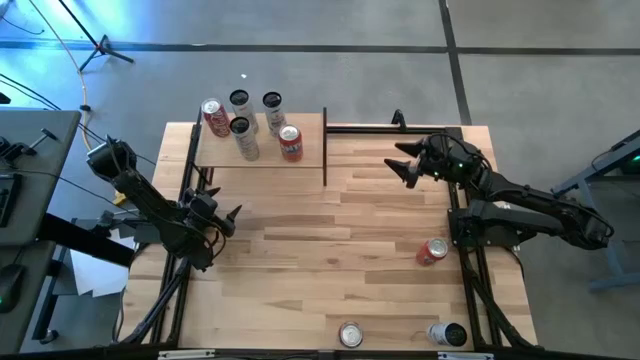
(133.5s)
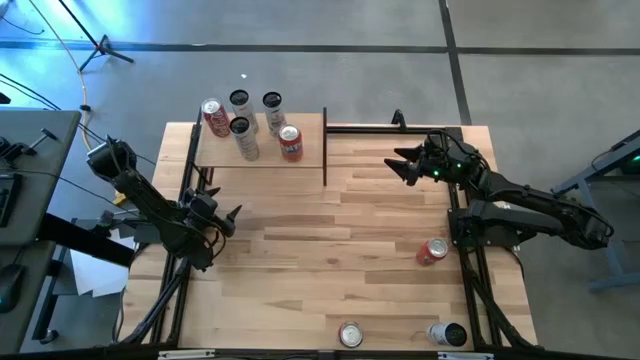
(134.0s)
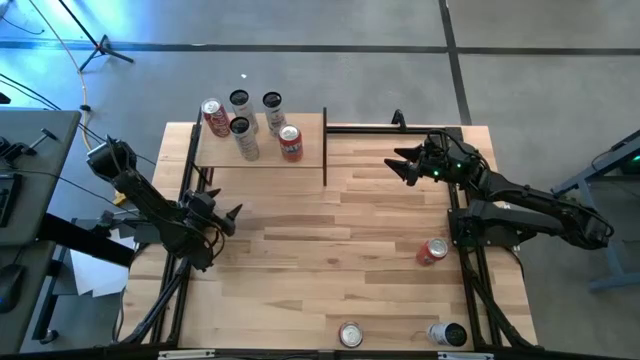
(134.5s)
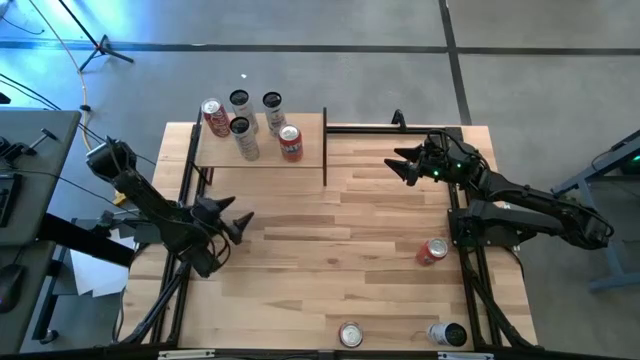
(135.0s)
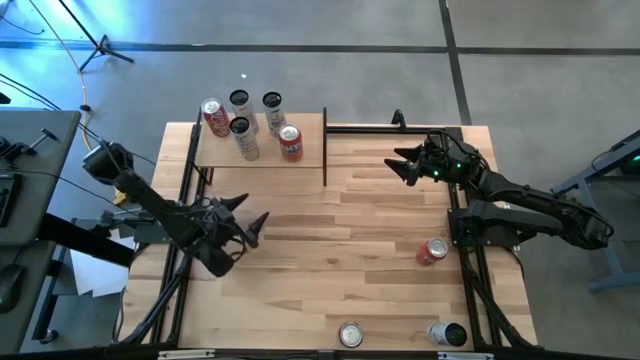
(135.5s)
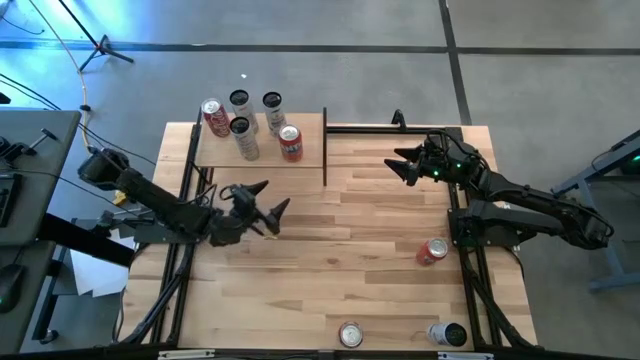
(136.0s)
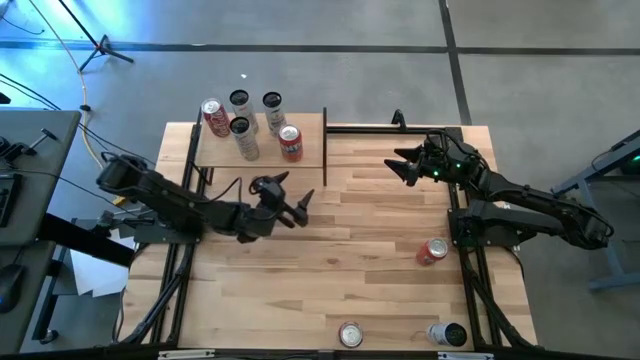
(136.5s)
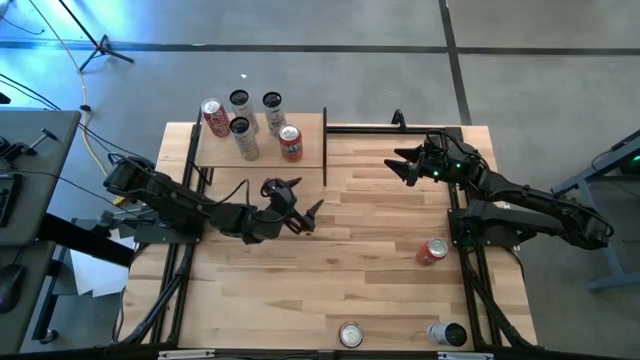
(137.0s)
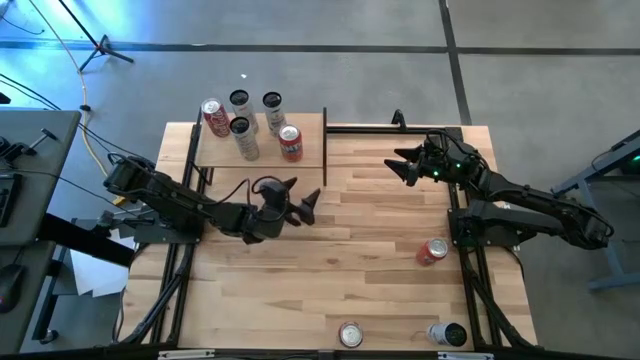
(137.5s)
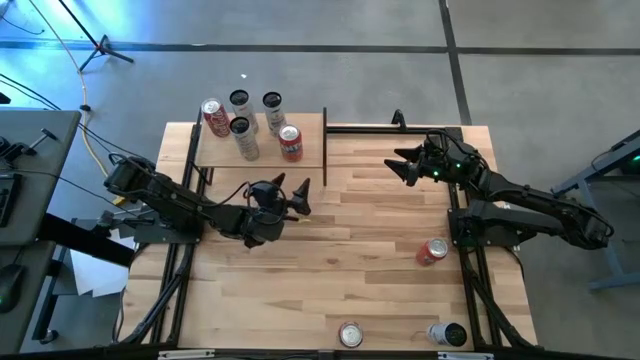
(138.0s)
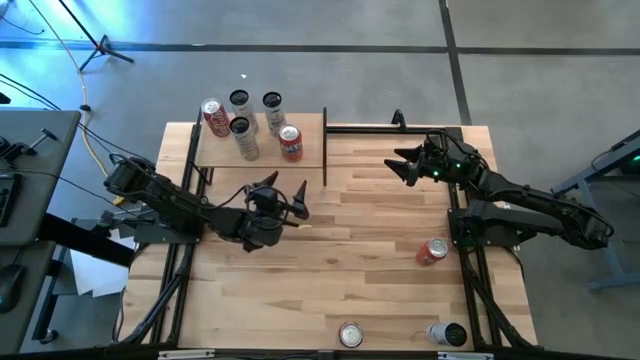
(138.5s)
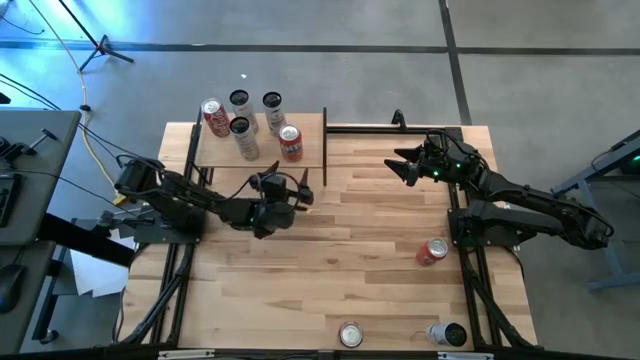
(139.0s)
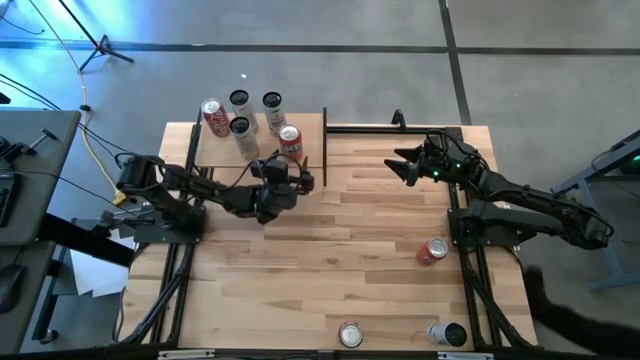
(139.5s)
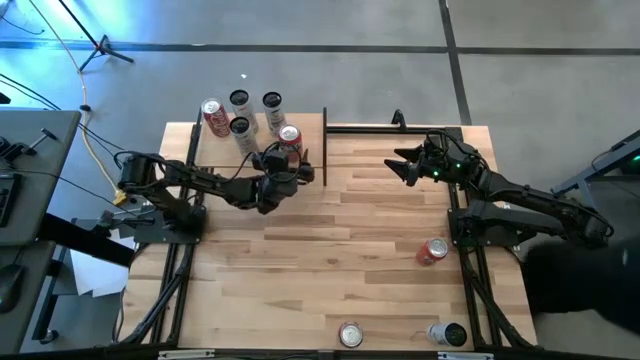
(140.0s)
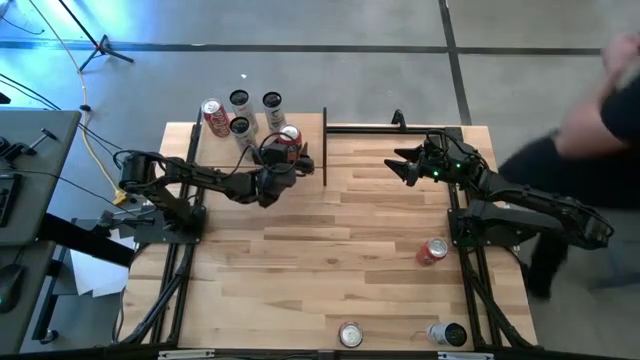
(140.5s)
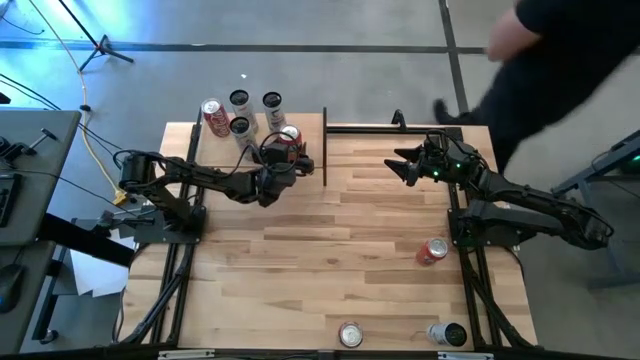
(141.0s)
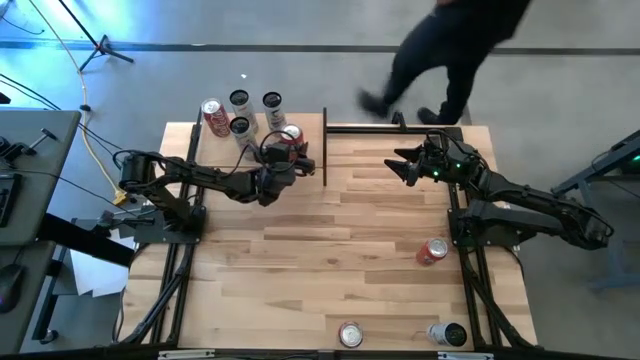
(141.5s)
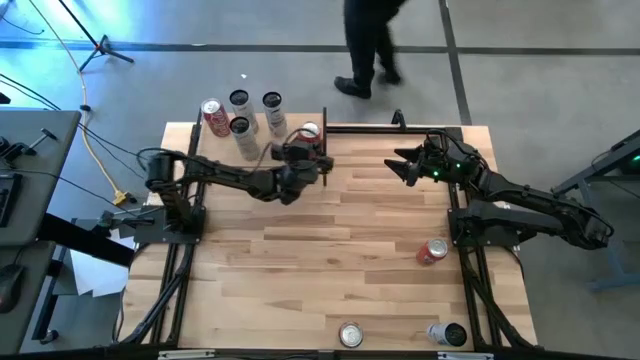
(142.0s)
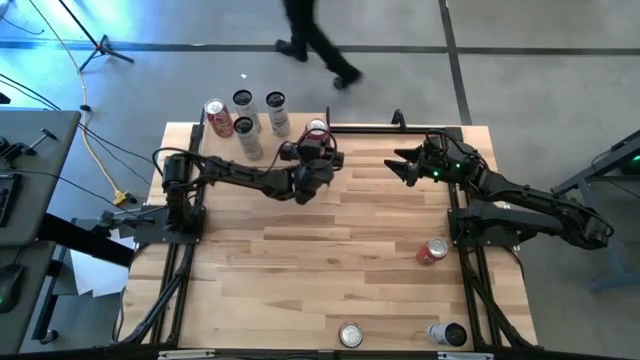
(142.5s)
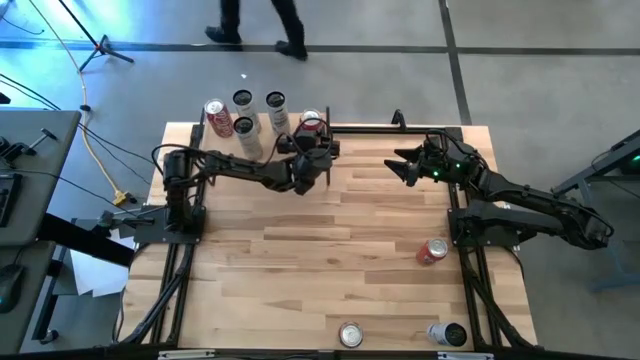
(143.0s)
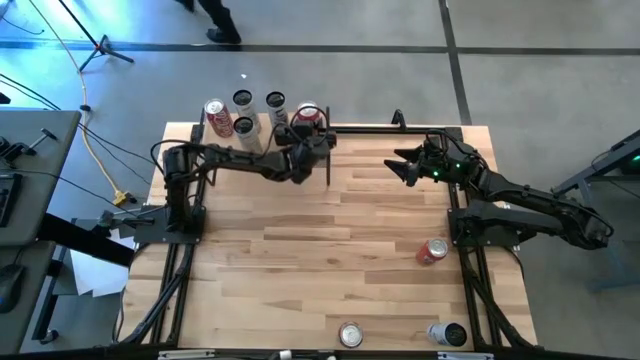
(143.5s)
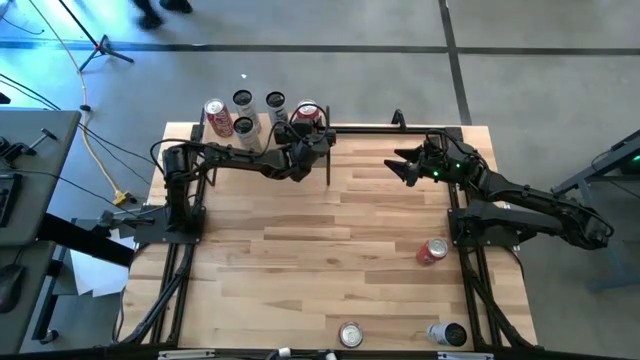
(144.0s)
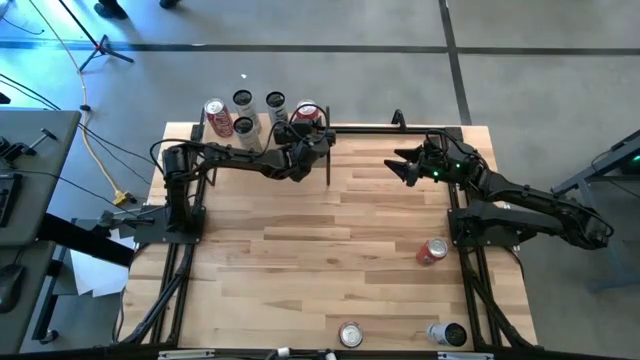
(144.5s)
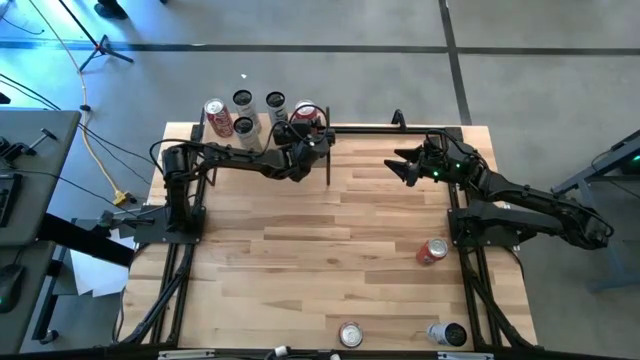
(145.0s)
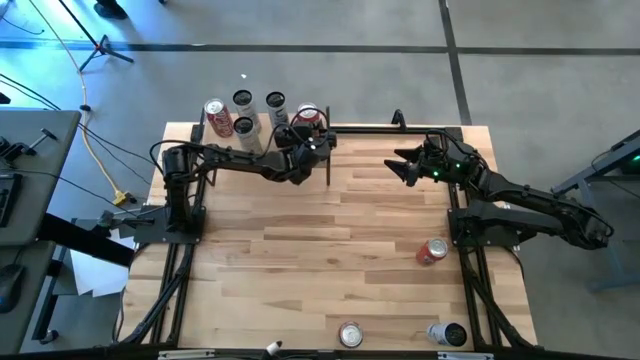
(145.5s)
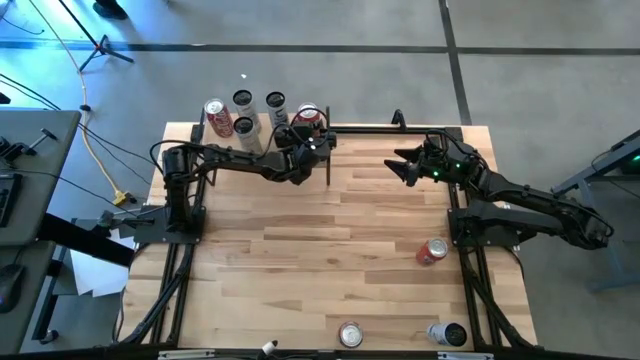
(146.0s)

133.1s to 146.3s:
Task: Place canned beverage on shelf
Put the top orange soda can on the shelf

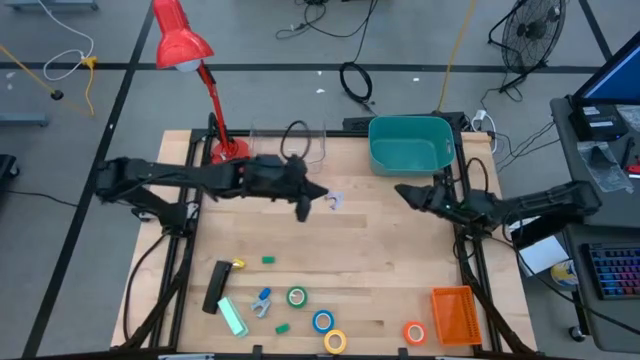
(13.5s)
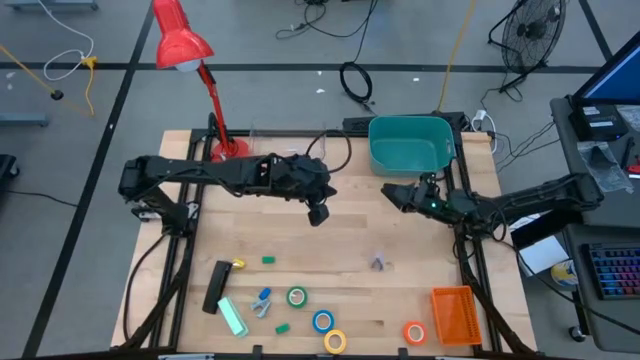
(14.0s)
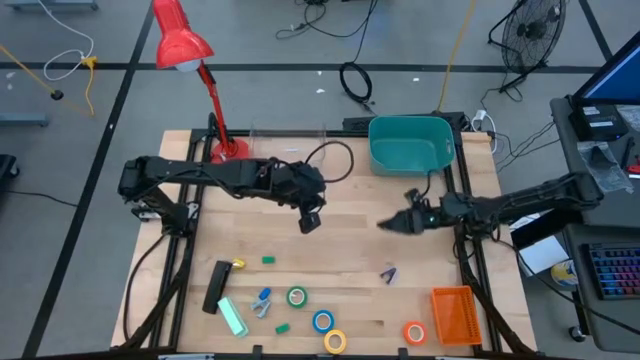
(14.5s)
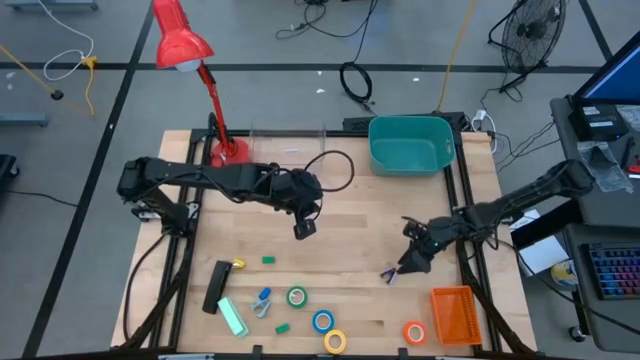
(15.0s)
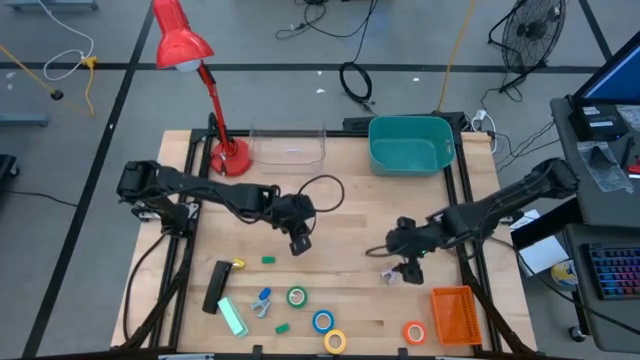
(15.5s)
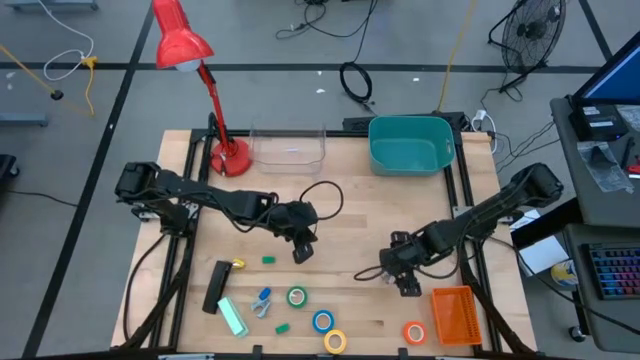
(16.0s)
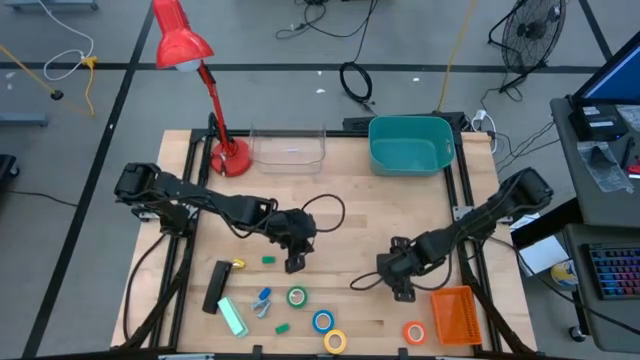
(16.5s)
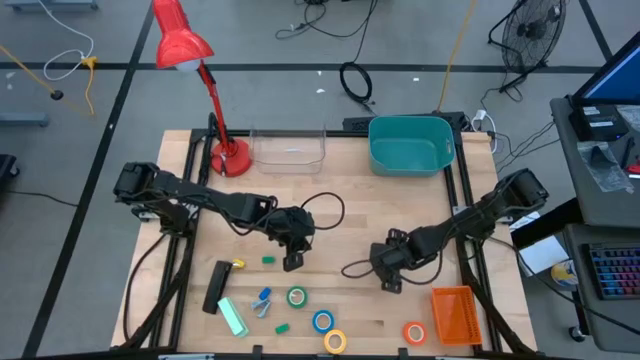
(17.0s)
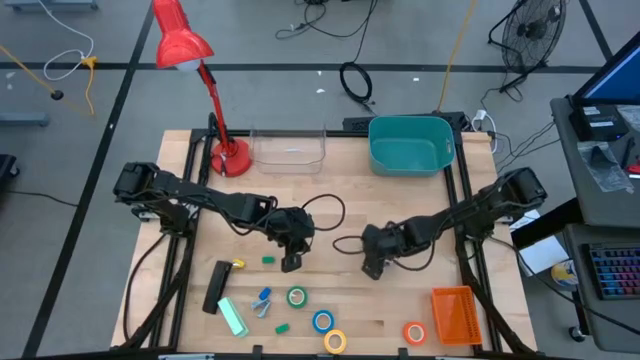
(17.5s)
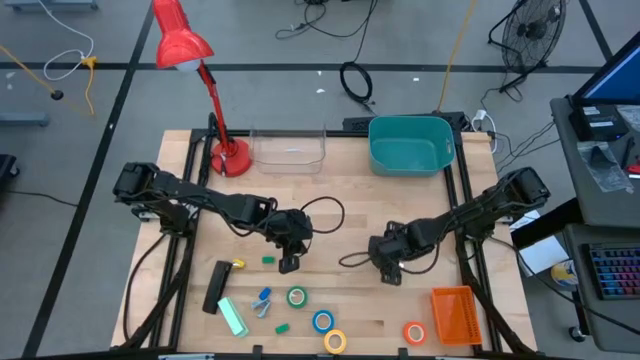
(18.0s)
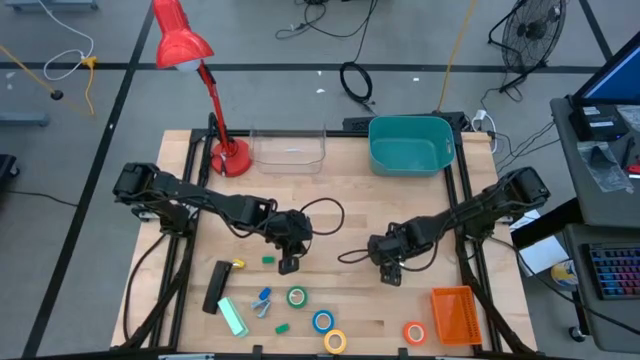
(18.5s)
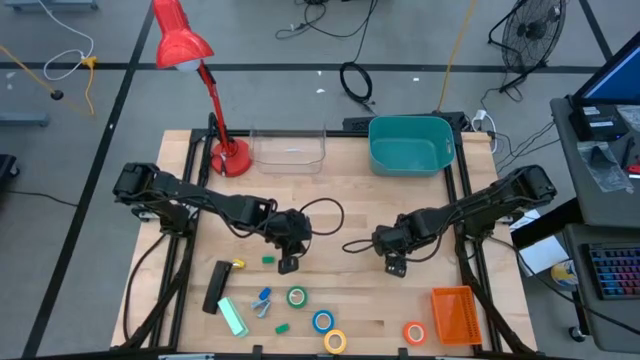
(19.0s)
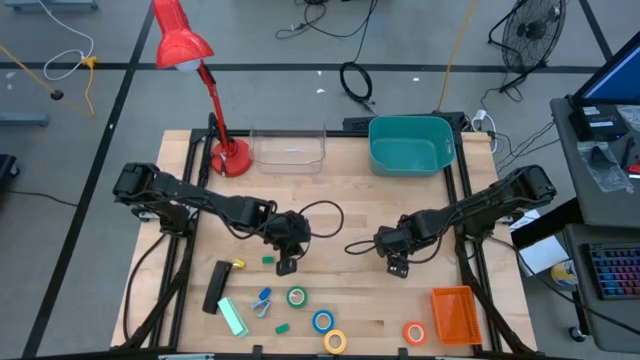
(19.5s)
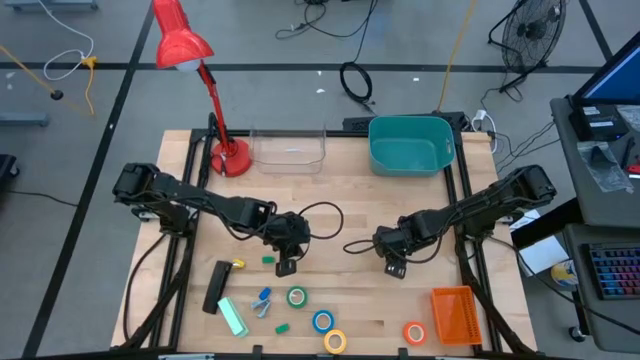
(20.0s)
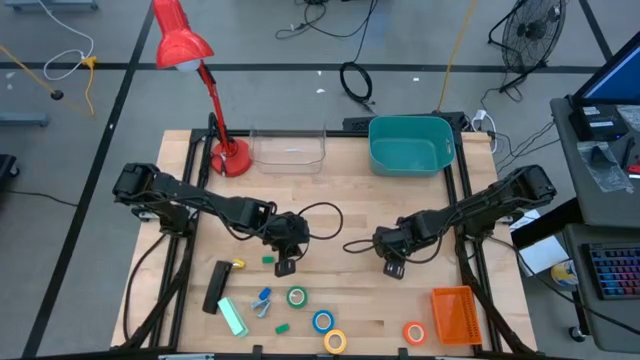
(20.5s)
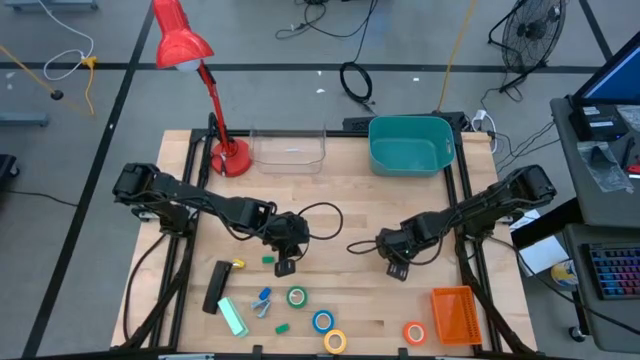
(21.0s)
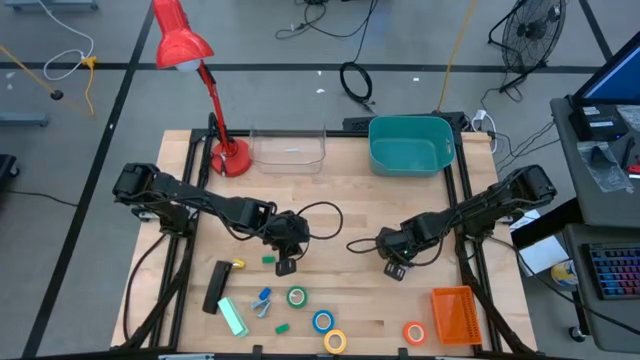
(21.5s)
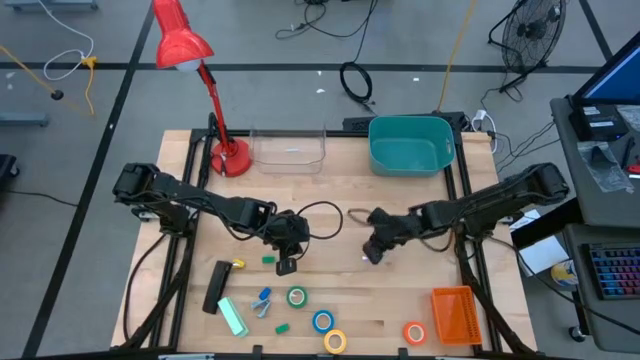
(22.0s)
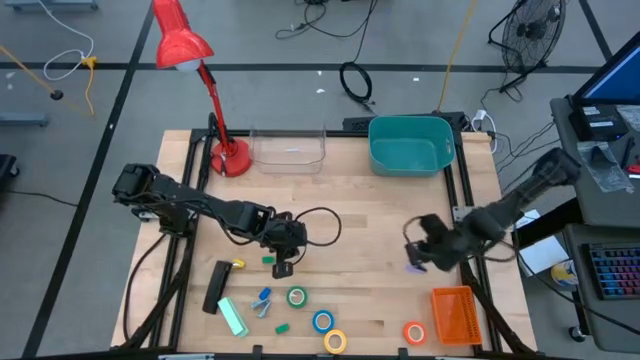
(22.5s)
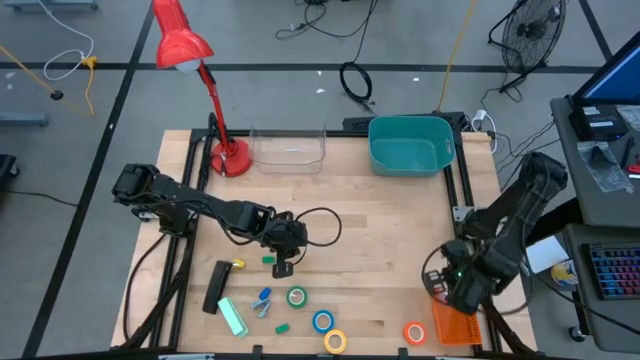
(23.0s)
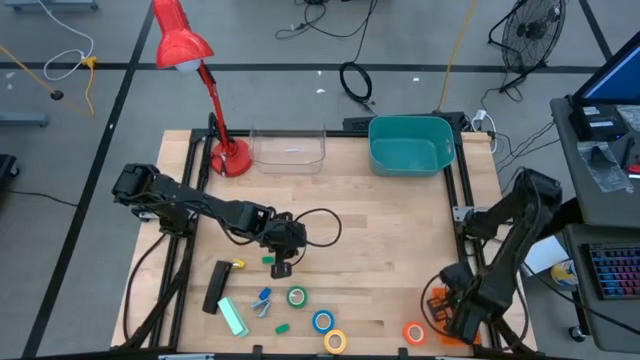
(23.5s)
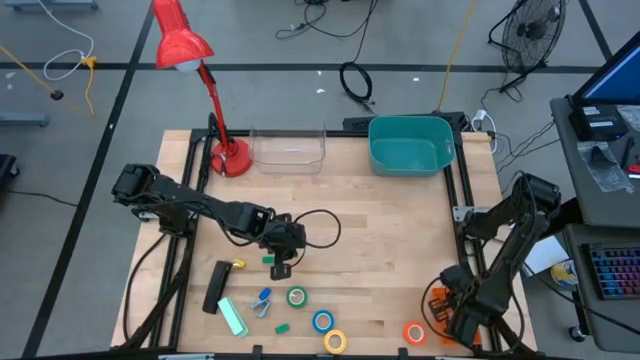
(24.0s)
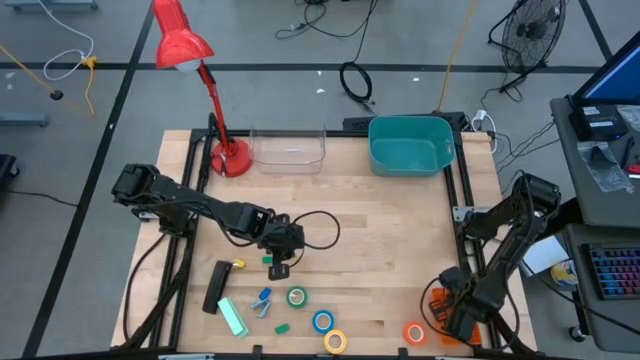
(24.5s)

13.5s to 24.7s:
Task: Pick and place Stapler, Stapler remover, tape
Put the violet staple remover into the orange bin
